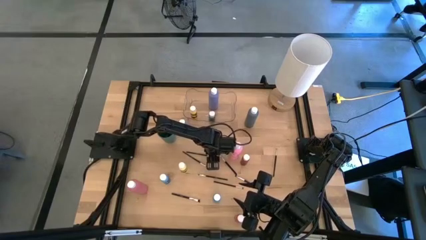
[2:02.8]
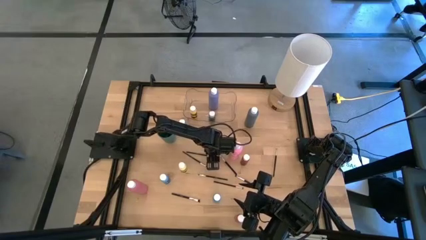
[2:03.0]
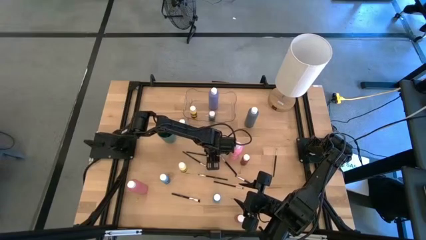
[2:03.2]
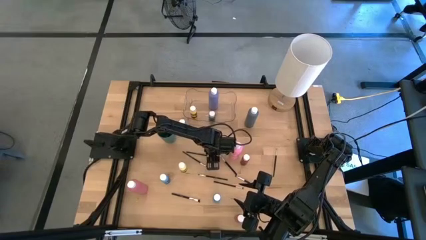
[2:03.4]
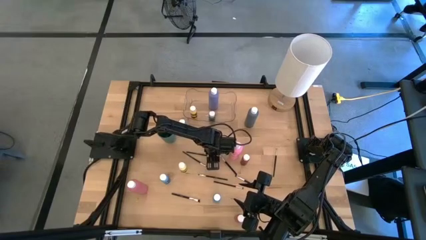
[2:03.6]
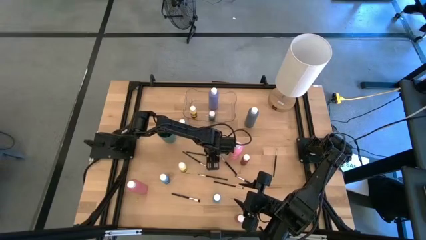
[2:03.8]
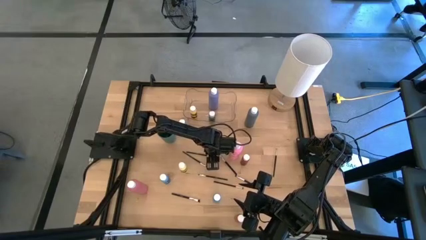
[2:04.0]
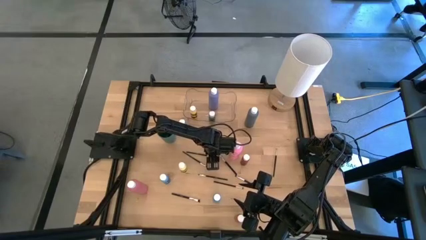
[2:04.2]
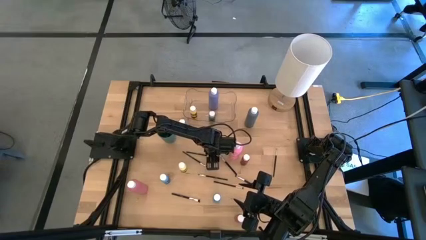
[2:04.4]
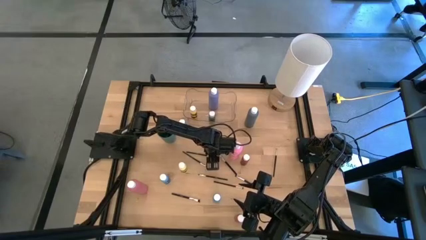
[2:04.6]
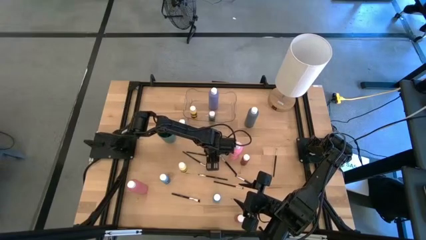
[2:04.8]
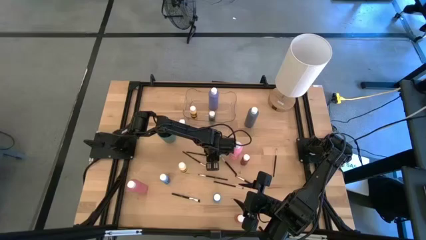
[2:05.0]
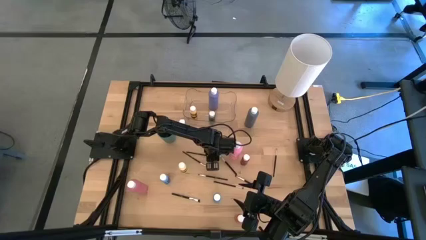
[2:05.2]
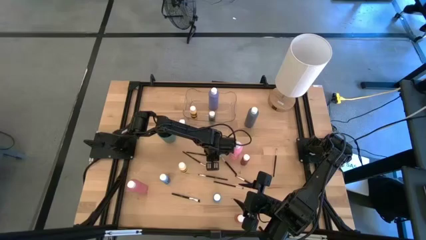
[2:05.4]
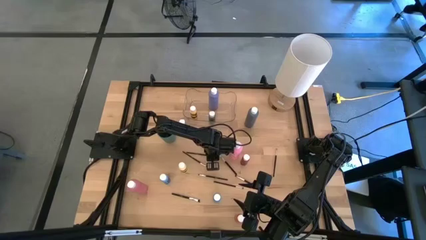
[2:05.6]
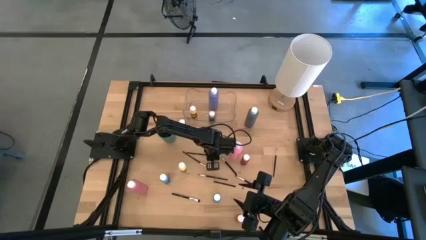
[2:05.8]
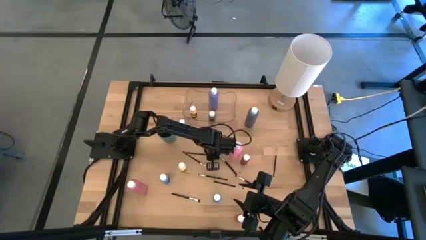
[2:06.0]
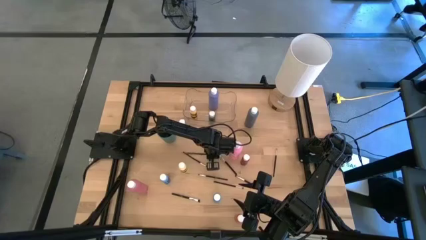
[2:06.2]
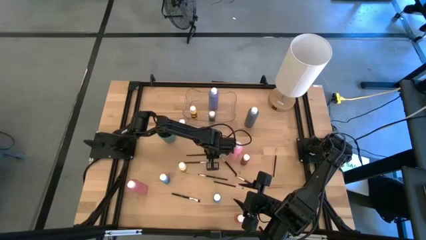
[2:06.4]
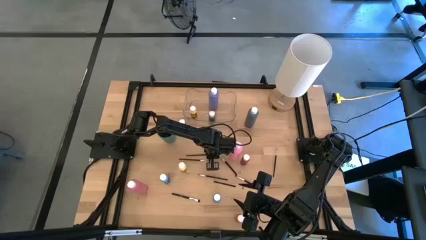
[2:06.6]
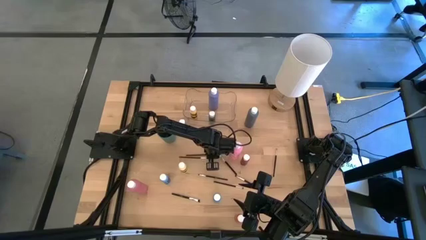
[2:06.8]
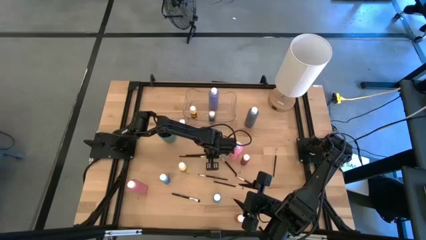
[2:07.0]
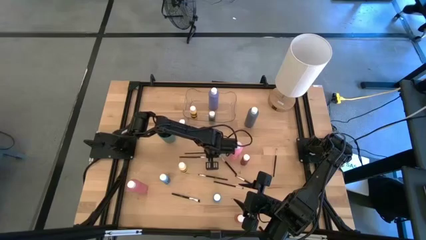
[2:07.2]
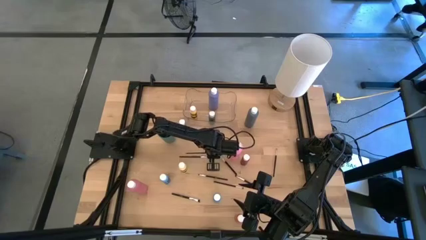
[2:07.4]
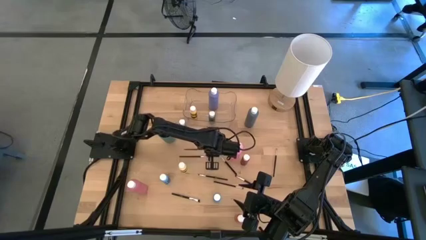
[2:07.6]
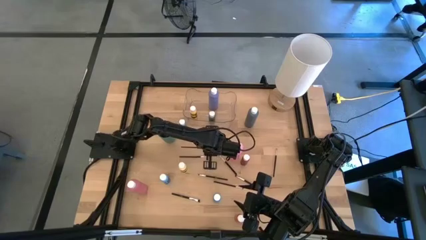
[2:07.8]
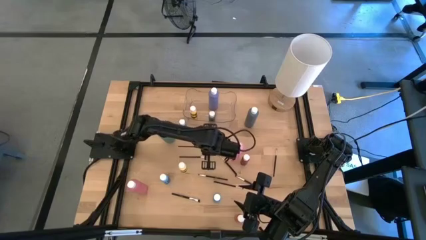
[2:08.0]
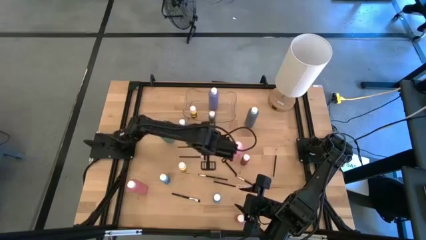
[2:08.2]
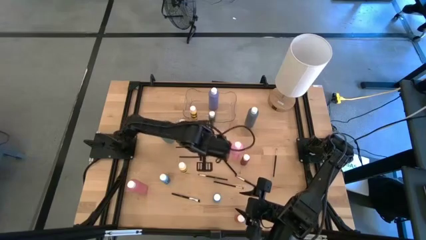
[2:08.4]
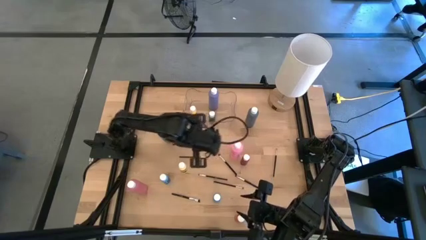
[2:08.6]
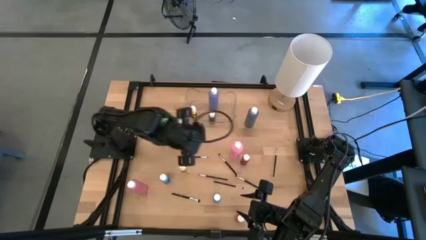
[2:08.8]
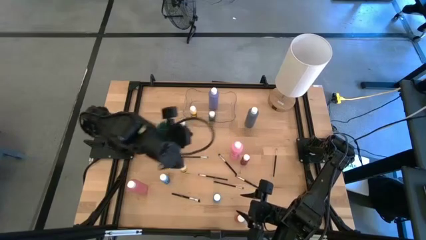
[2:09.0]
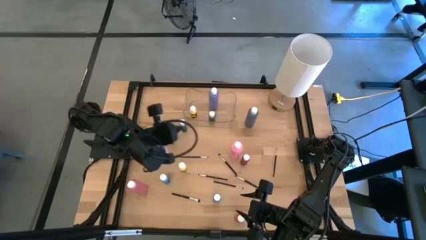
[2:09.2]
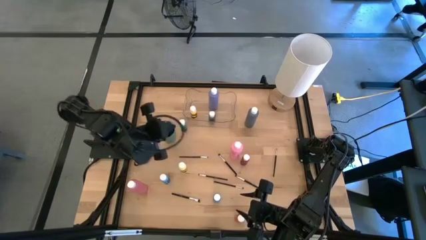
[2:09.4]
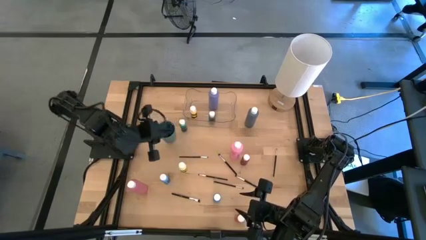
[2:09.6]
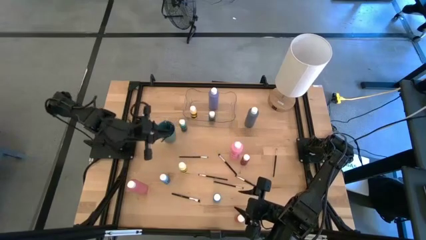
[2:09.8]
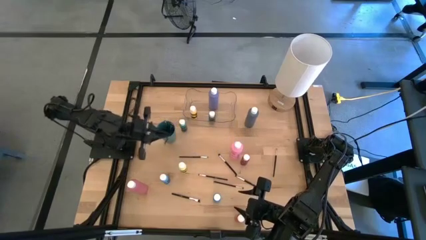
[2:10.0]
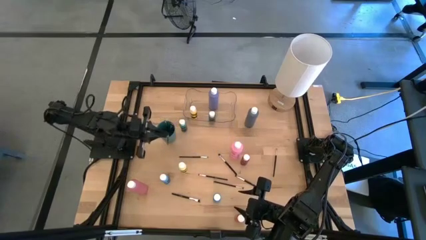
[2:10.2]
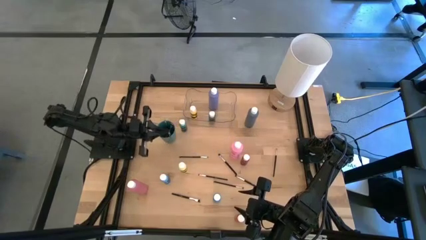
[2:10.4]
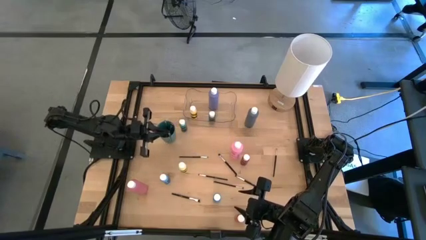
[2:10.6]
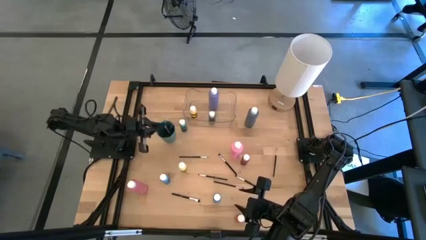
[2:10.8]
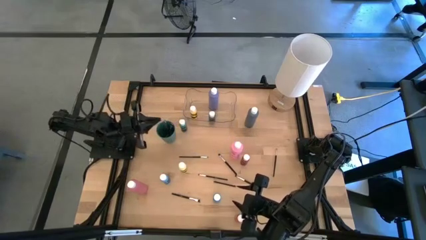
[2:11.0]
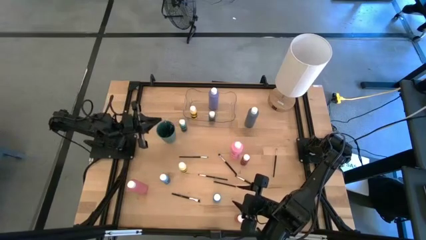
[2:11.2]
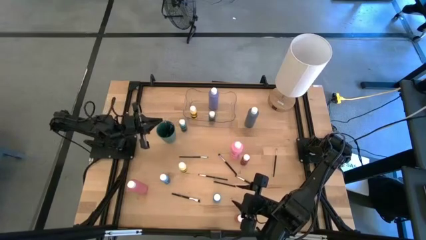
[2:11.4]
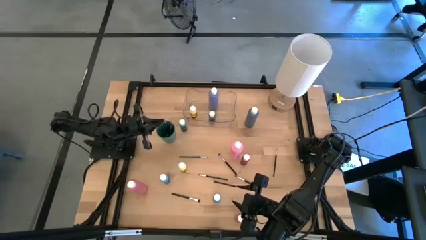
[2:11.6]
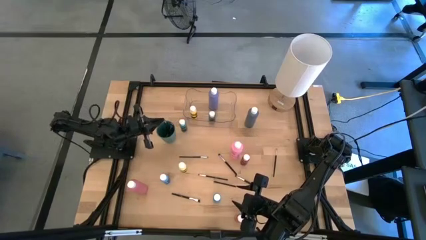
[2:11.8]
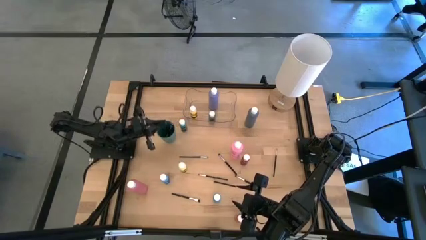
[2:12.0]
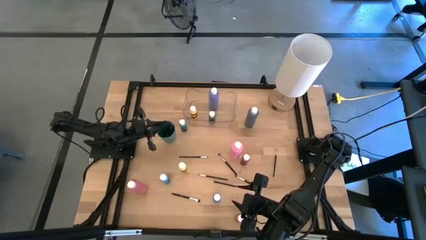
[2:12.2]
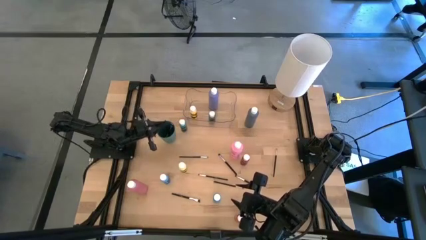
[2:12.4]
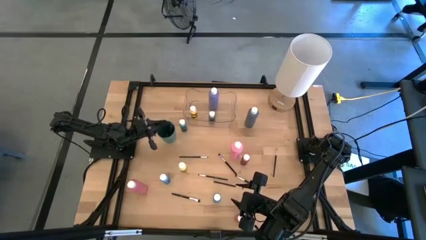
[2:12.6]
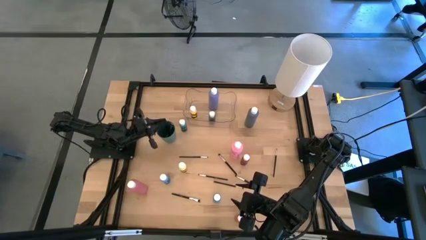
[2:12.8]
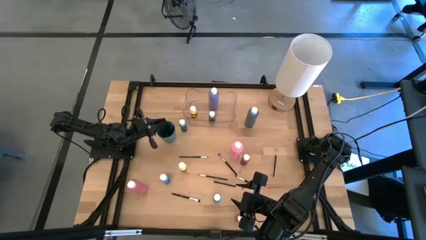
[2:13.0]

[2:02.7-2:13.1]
Task: Pick & Place Paint Supplies
Put the black paint brush into the green cup

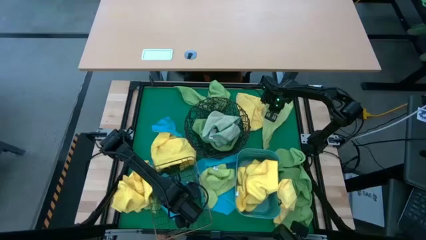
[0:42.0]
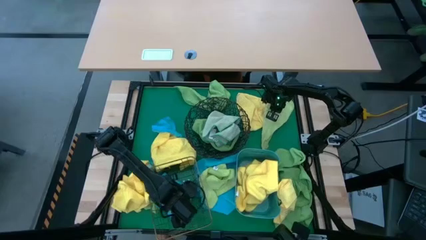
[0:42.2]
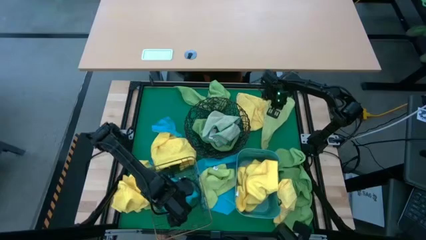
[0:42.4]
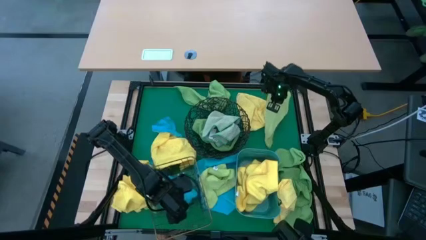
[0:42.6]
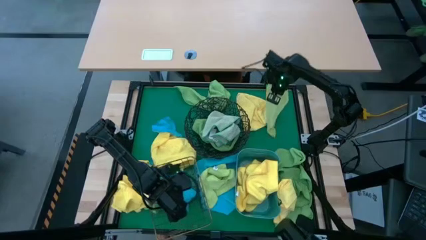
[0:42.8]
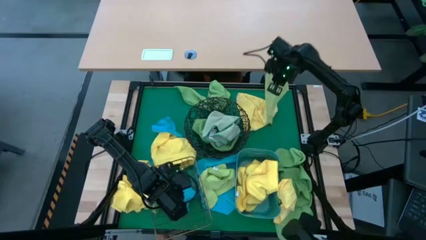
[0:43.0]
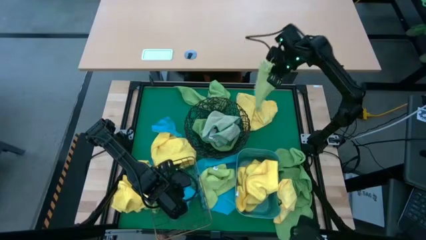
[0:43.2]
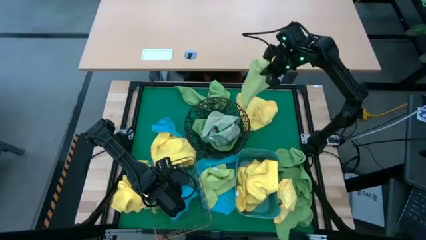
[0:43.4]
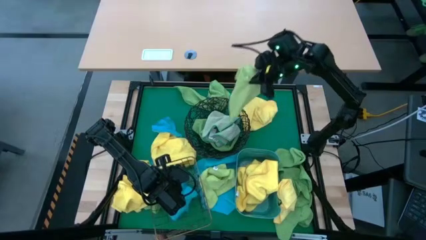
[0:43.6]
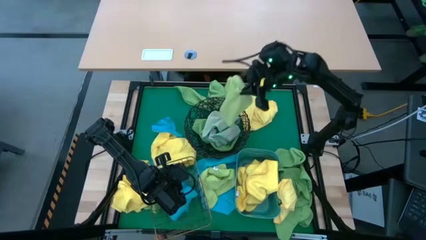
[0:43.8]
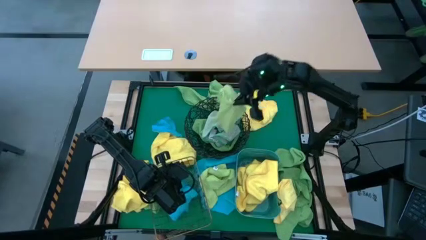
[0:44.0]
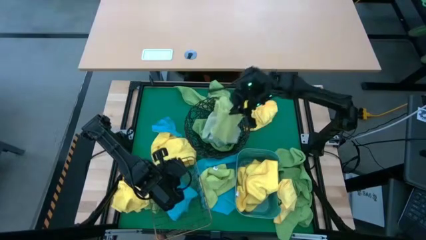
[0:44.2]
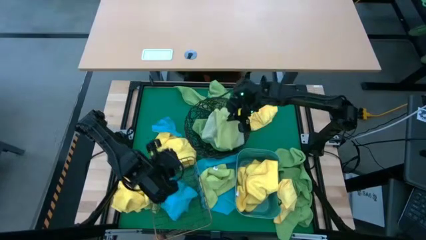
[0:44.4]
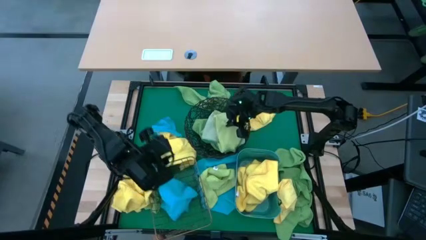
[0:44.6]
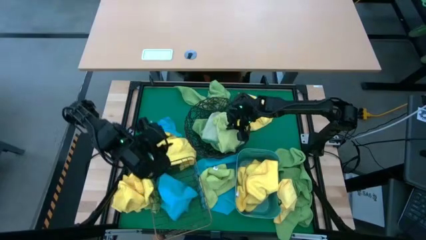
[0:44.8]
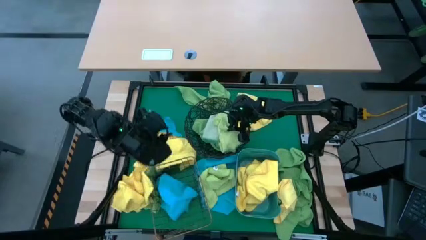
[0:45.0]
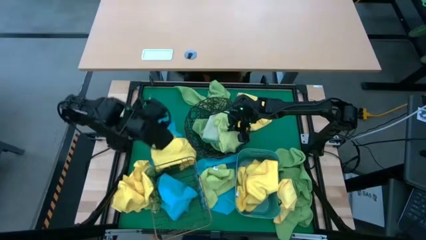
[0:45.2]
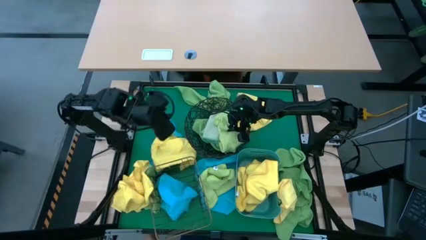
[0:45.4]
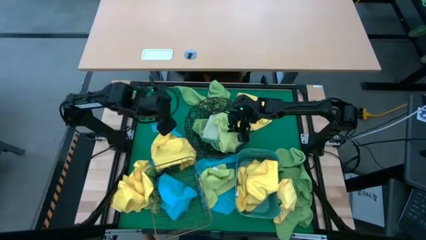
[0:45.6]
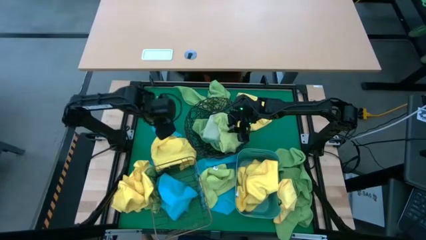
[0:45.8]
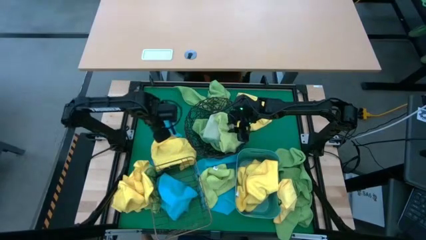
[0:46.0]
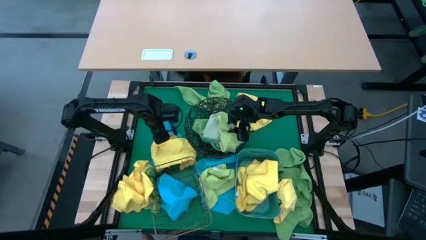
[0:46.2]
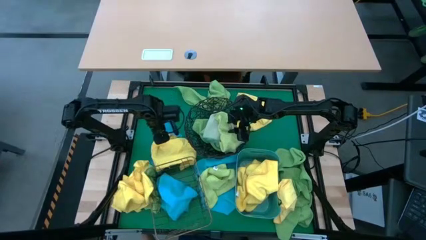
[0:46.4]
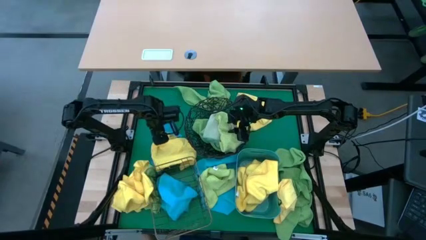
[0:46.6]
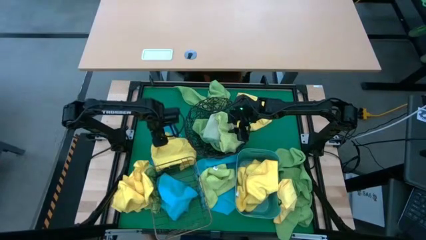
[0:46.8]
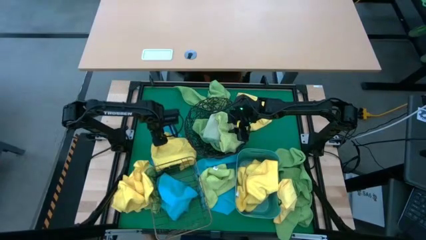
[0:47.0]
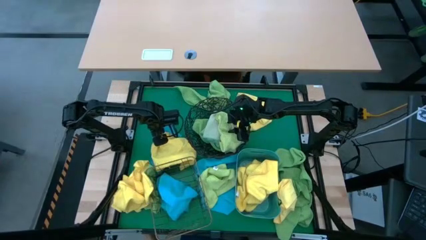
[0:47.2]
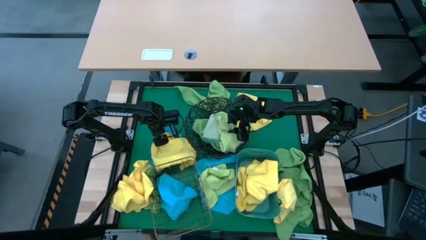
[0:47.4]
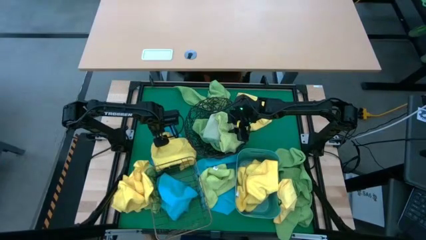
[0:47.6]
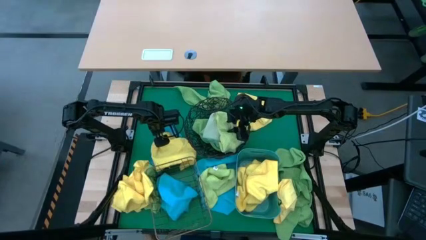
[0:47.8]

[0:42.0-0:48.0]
Task: Sort microfiber towel by color & place in baskets
Put the green microfiber cloth into the round wire basket

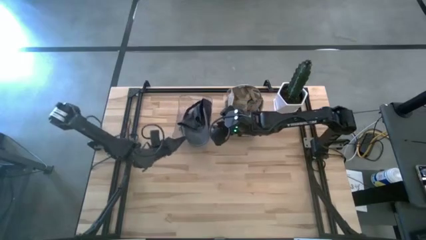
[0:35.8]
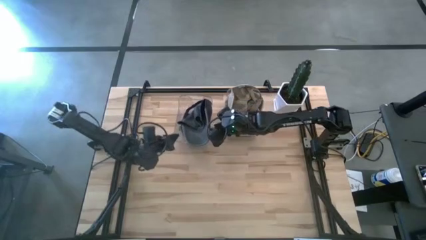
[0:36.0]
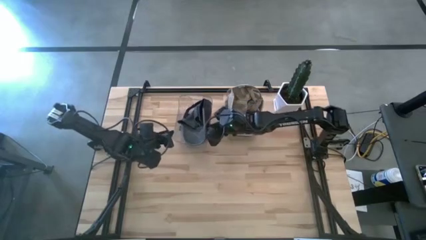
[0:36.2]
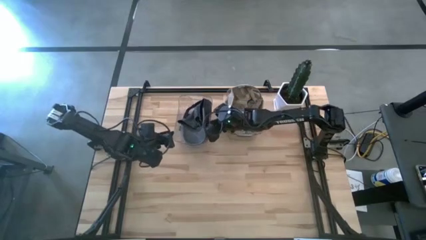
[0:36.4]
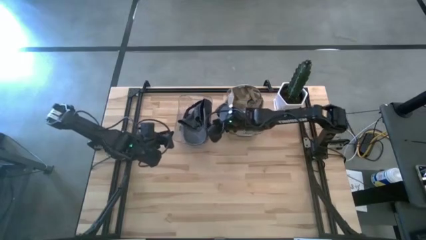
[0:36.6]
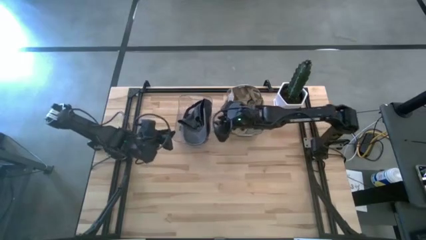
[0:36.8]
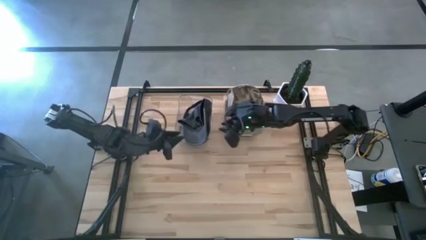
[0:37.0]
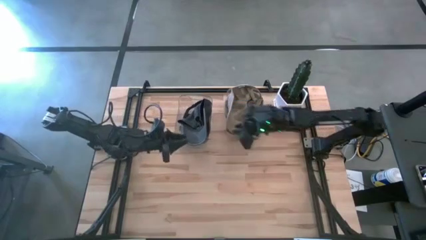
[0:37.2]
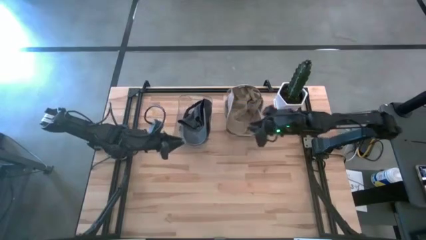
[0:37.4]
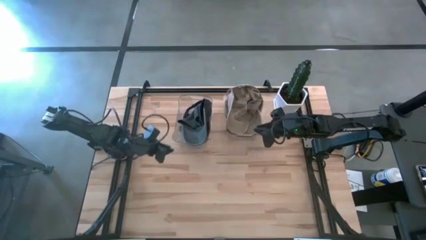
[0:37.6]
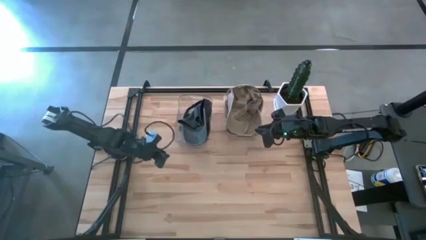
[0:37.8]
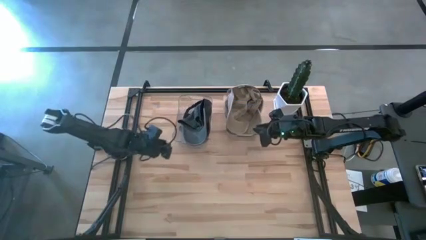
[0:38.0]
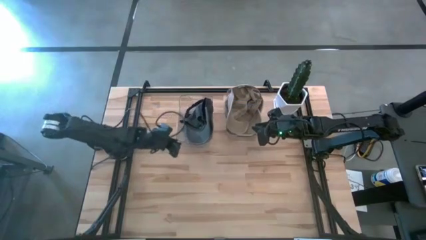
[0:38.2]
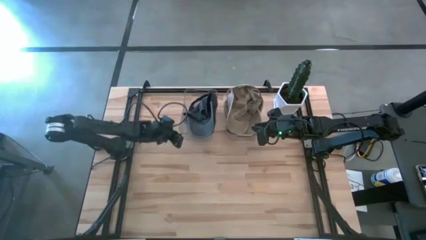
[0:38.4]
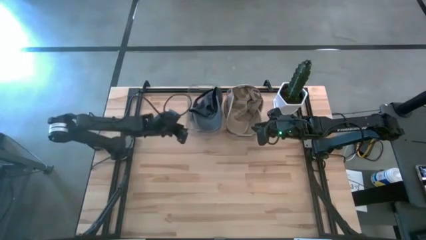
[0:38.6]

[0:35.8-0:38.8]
Task: Pick & Place hat
Adjust the left transparent bin
